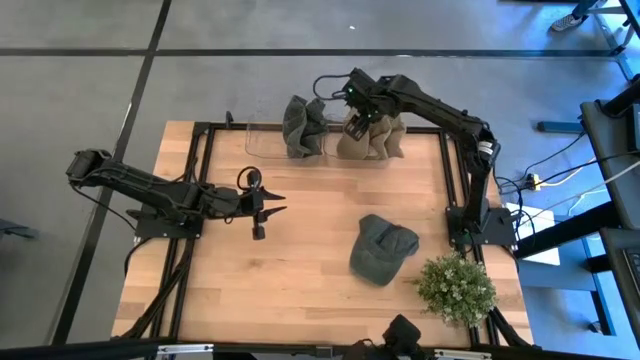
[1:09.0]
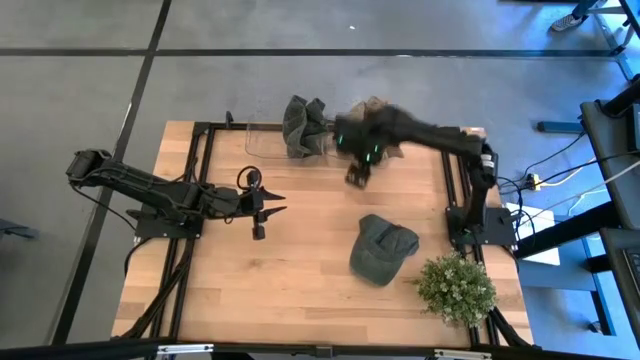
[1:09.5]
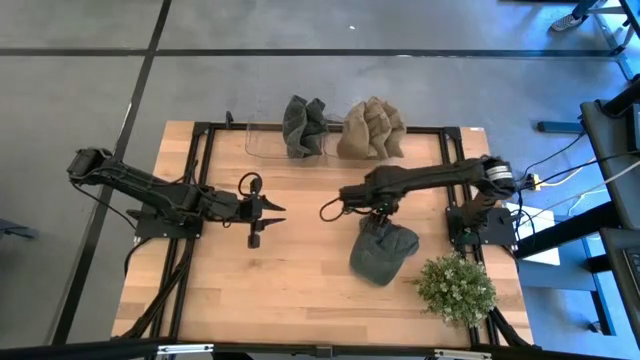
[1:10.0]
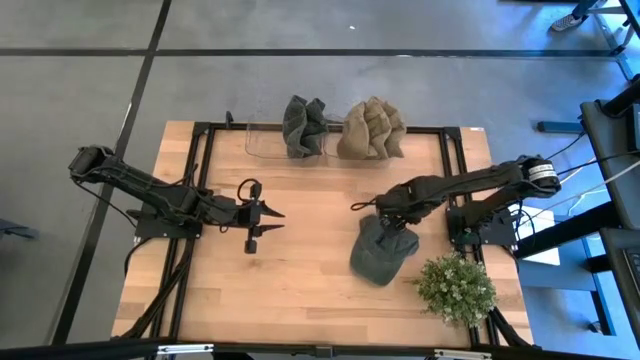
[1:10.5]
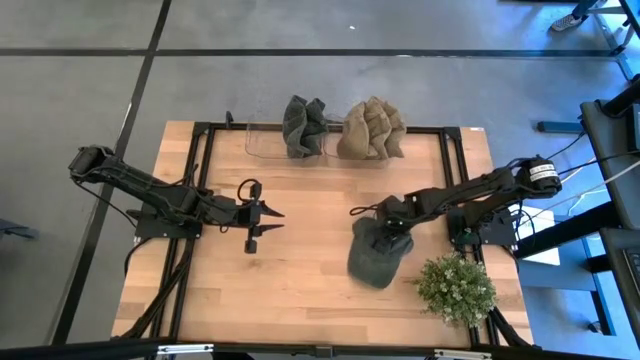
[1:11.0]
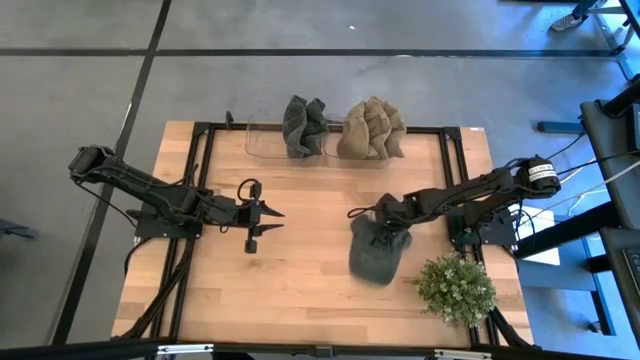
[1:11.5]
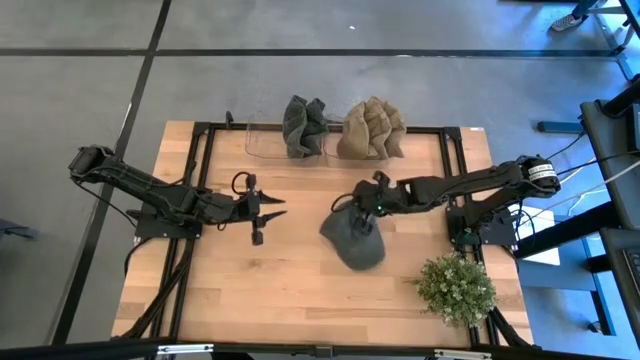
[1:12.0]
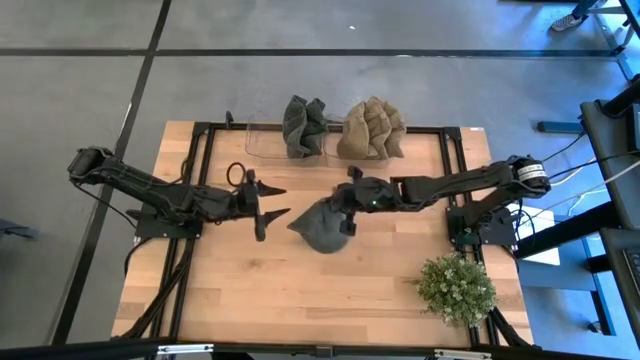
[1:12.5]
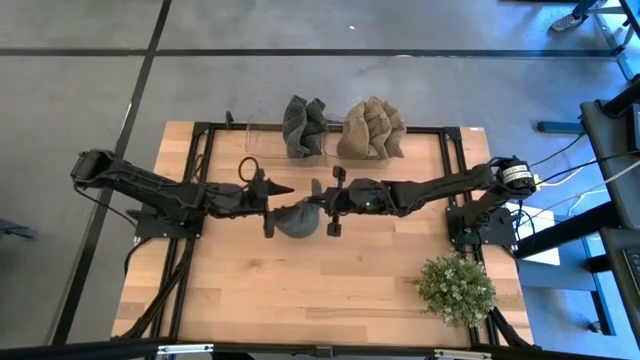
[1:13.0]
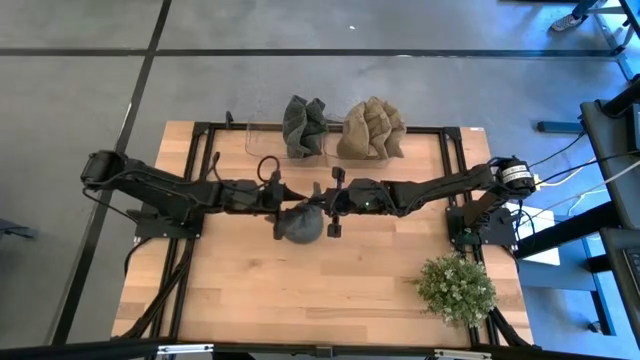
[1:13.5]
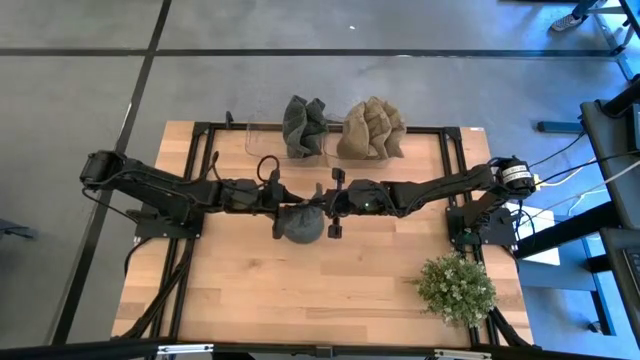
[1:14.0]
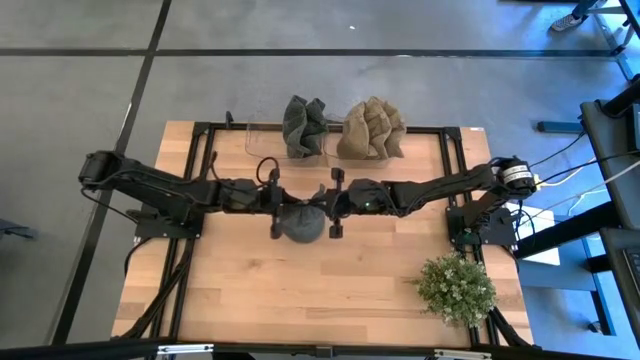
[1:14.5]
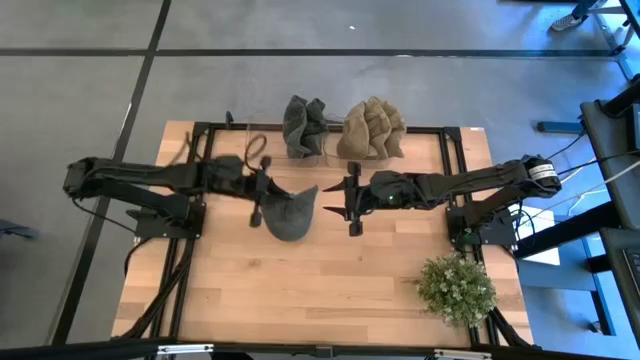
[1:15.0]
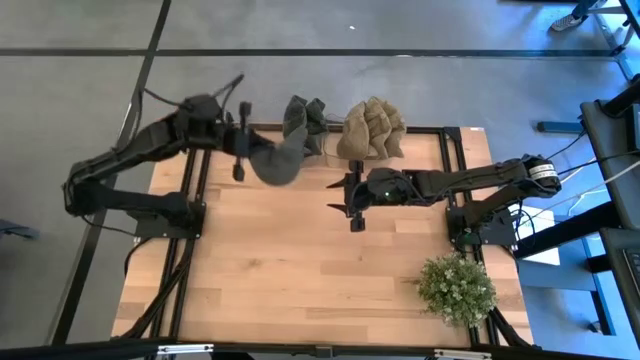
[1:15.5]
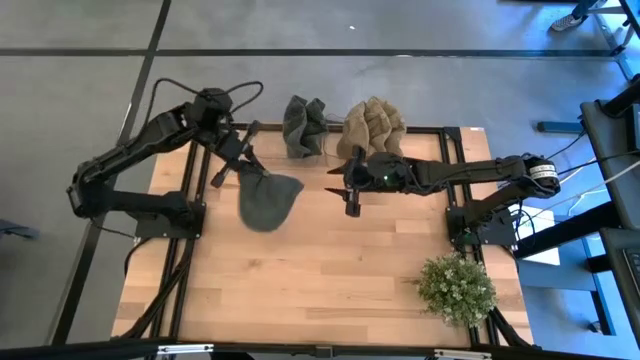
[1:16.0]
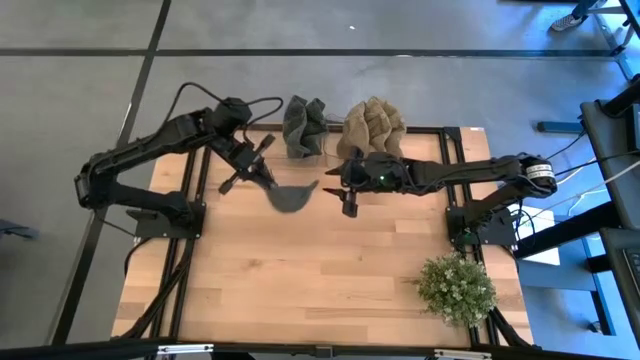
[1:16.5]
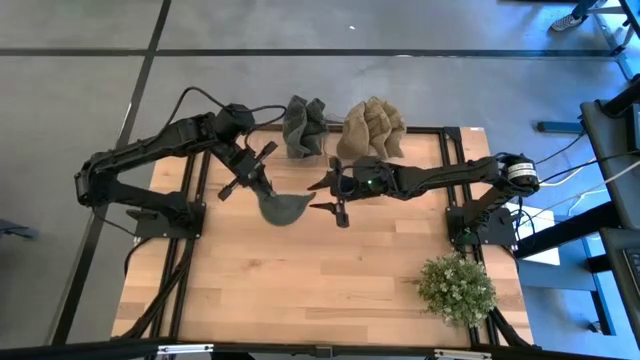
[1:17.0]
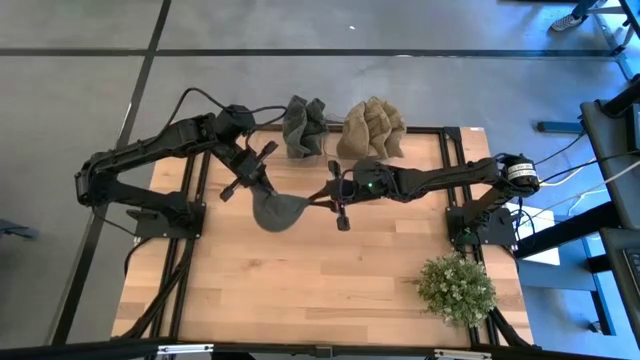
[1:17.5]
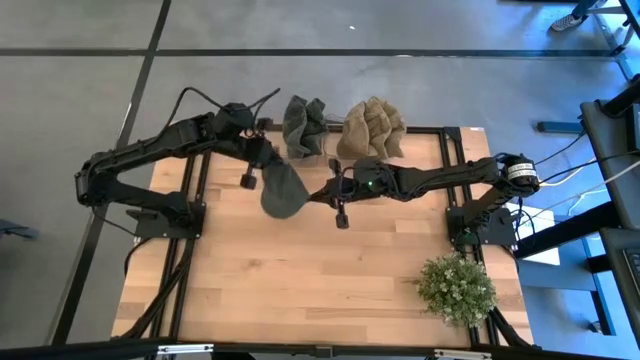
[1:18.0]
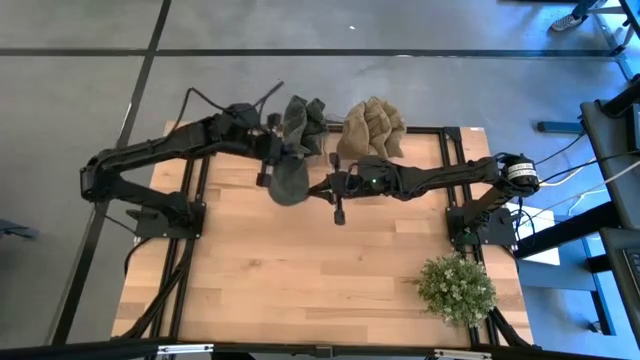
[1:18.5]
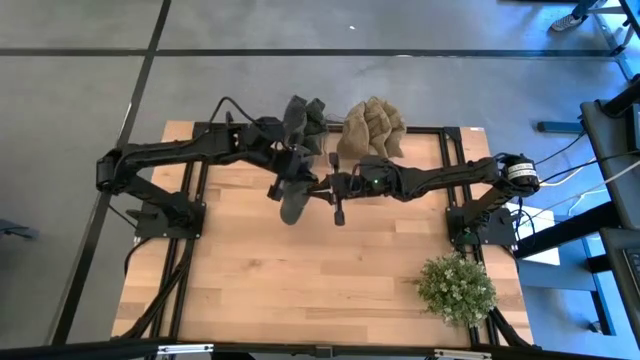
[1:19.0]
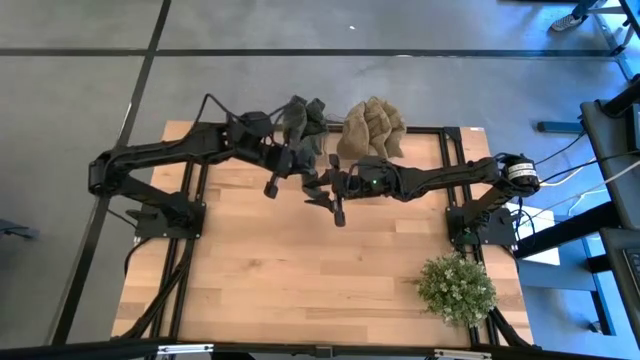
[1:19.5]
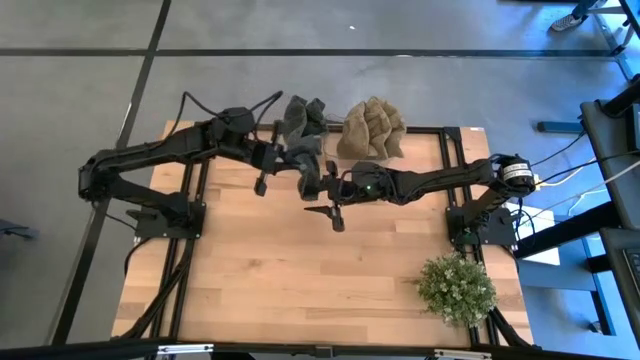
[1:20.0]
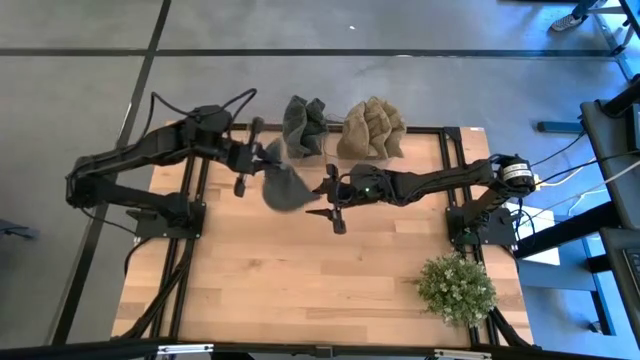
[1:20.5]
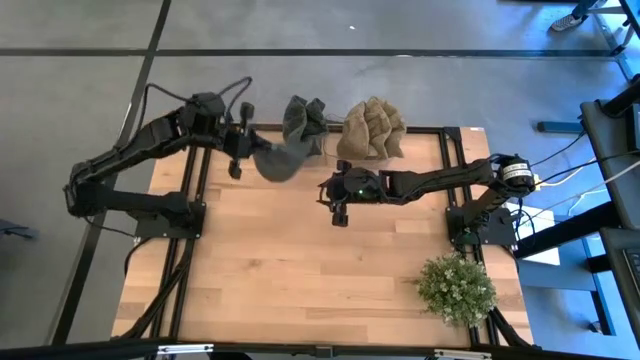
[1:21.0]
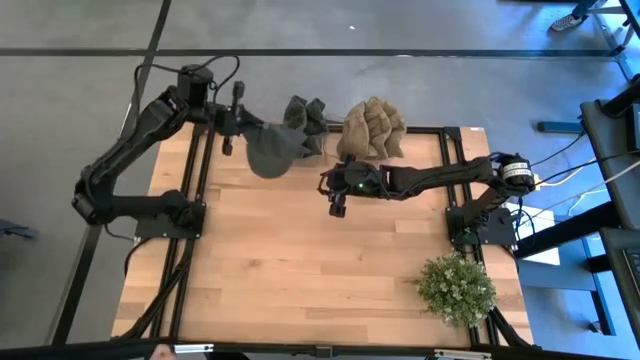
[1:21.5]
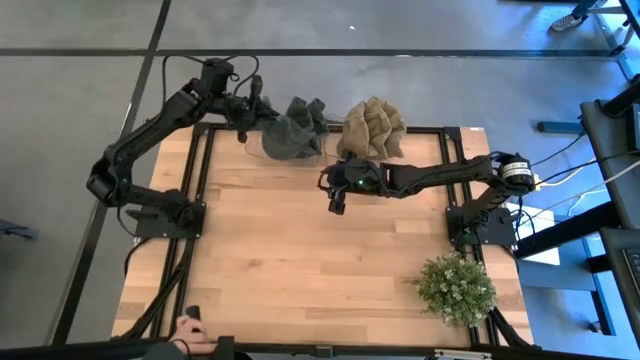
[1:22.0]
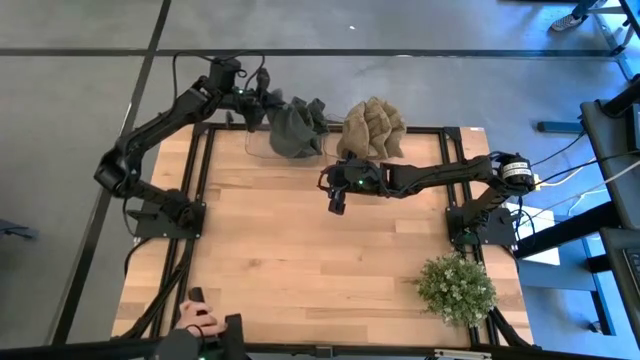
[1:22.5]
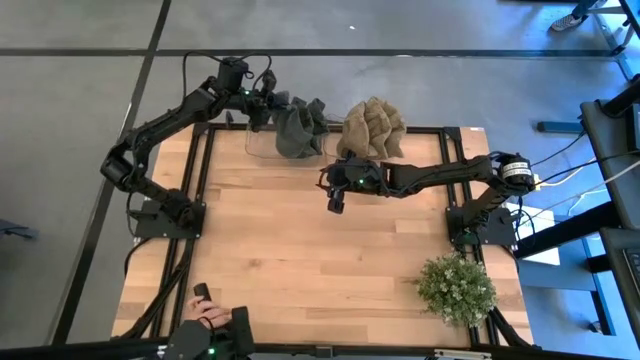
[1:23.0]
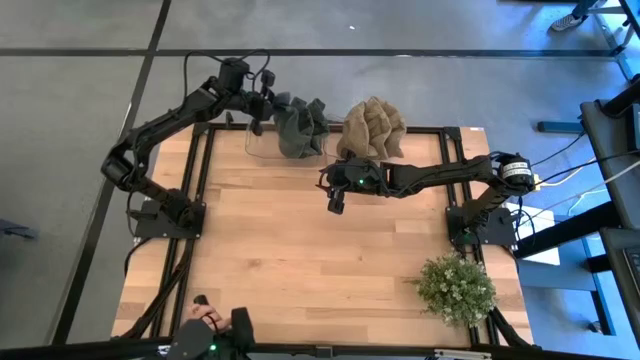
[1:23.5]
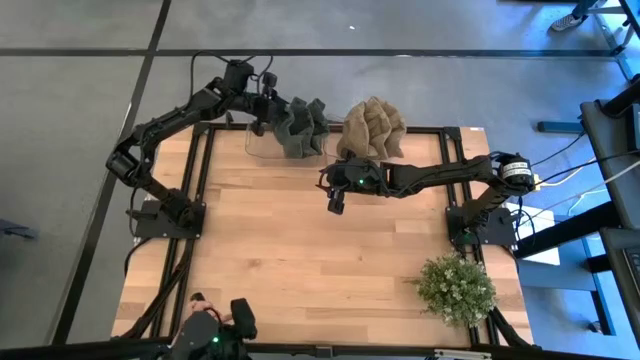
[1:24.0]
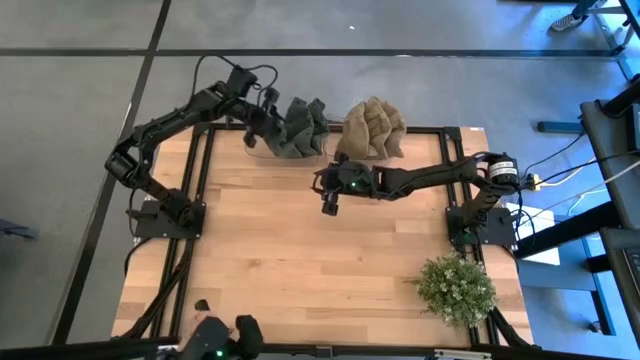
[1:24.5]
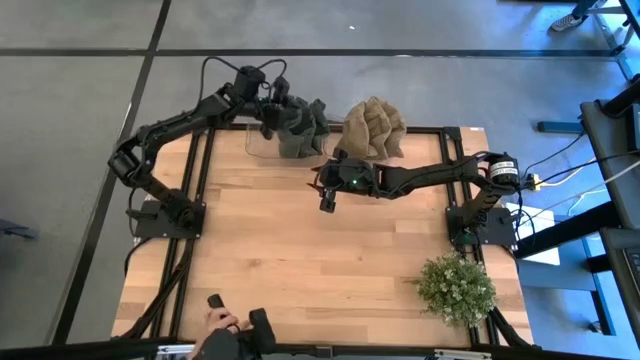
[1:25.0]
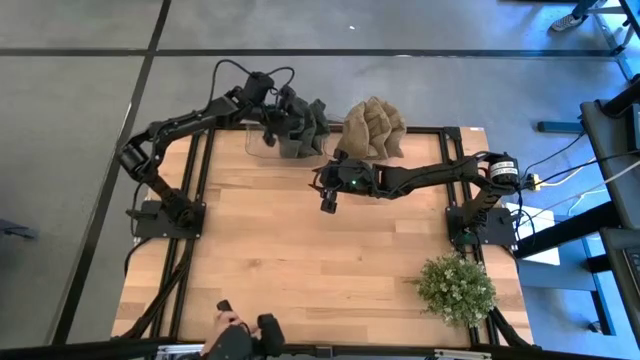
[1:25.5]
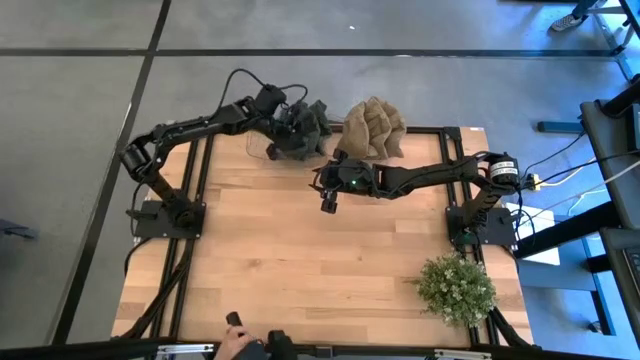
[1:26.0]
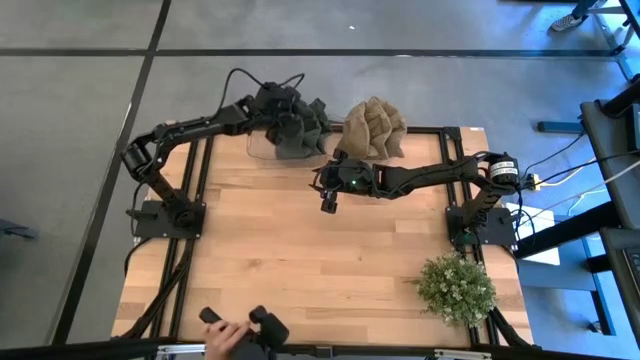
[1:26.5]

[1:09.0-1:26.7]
Task: Pick & Place hat
Put the black cap into the left transparent bin

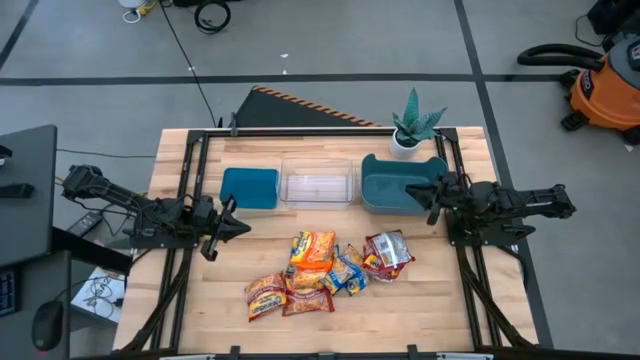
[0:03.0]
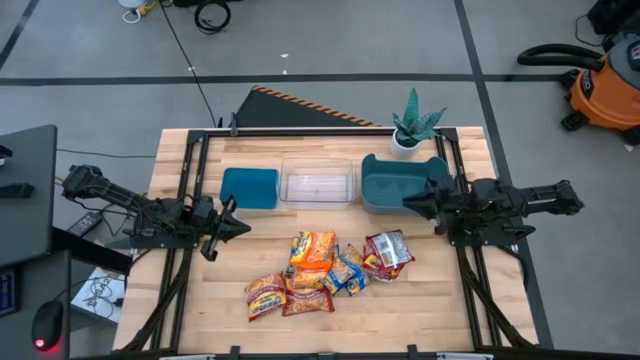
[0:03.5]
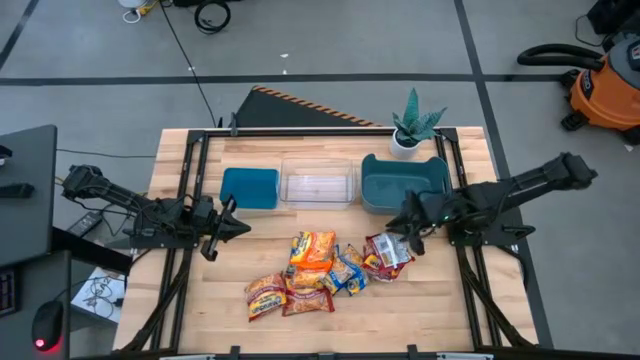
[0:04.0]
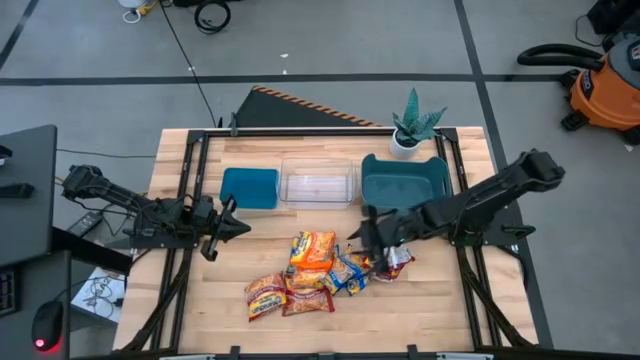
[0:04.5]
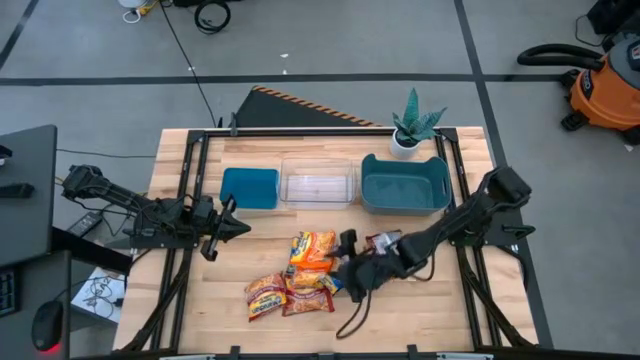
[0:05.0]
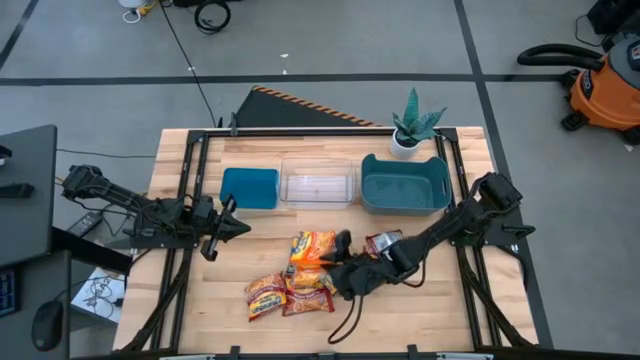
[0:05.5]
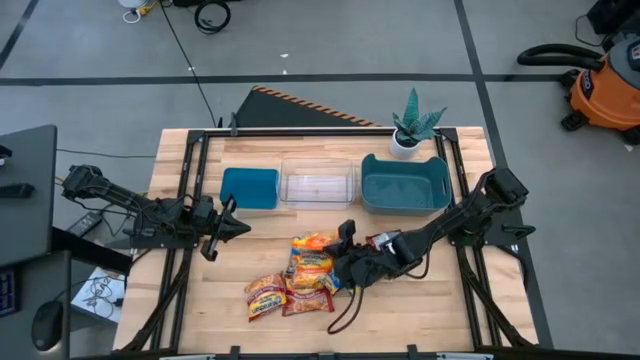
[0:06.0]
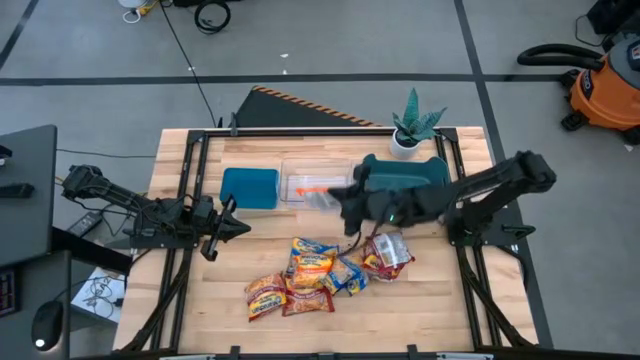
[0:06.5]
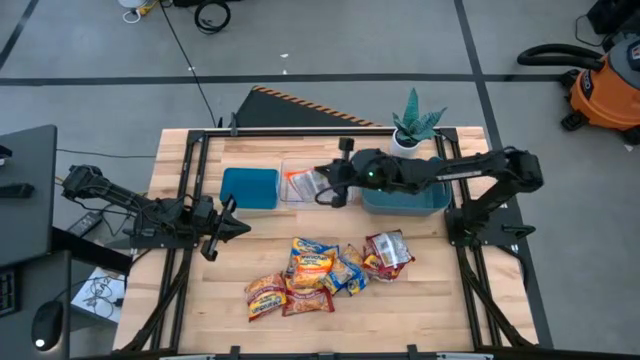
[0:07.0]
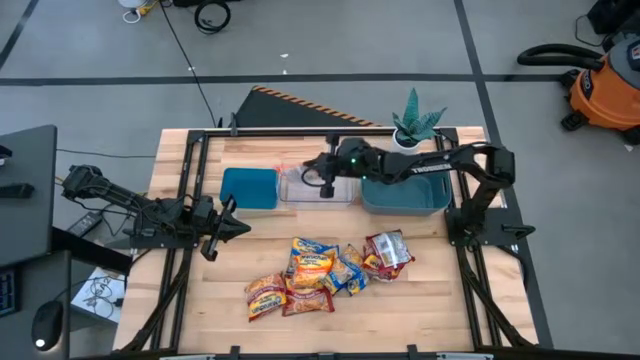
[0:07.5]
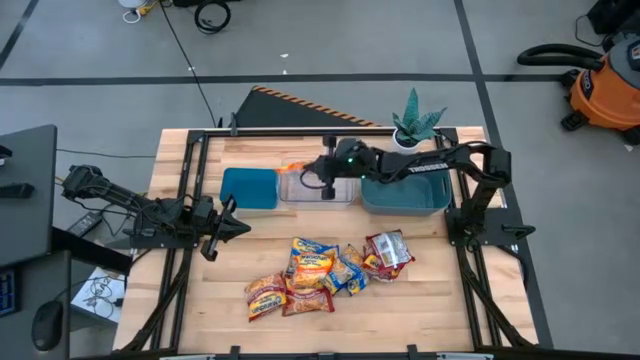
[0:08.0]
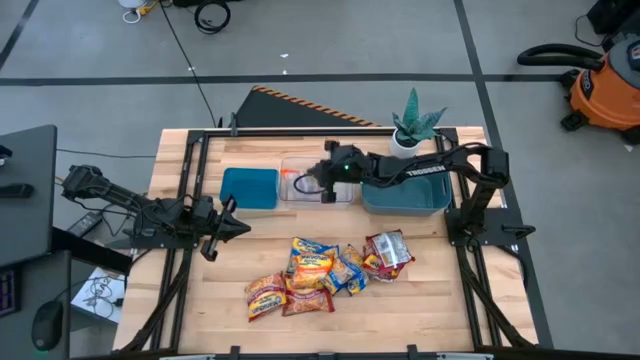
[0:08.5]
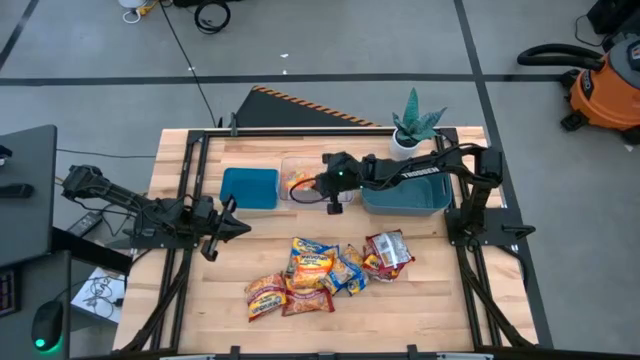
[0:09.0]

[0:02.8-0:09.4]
Task: Sort Maruchan noodles
Put the orange noodle pack into the transparent bin
